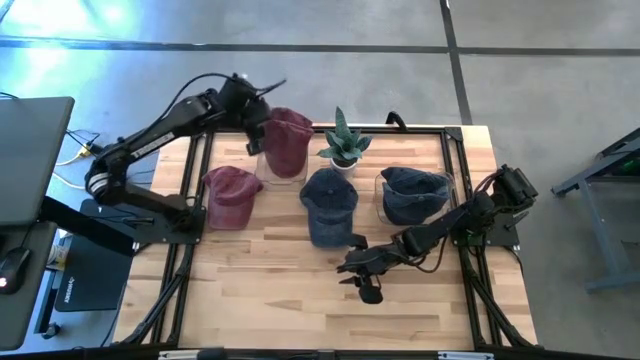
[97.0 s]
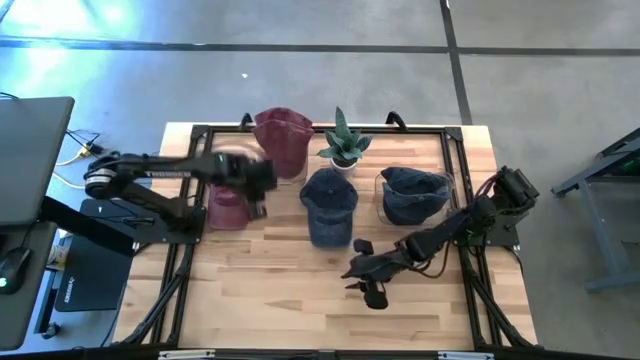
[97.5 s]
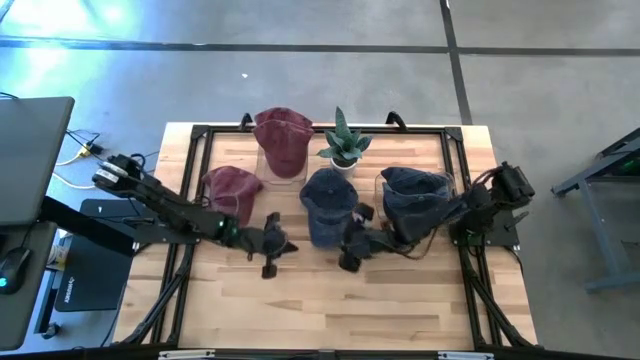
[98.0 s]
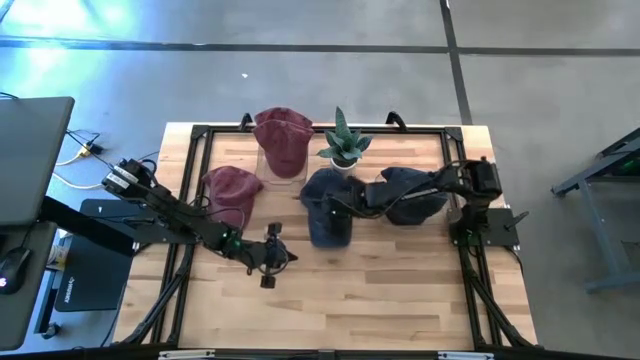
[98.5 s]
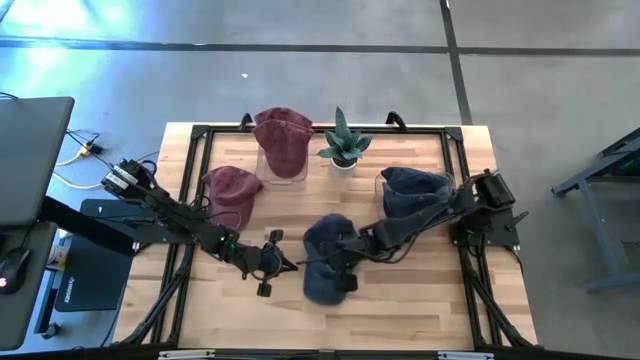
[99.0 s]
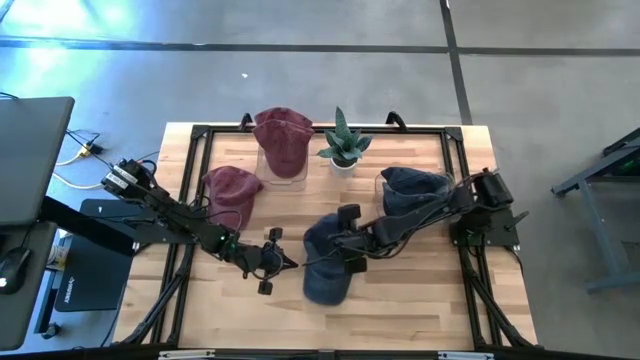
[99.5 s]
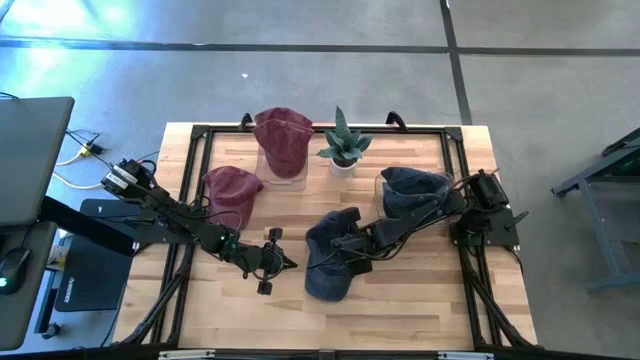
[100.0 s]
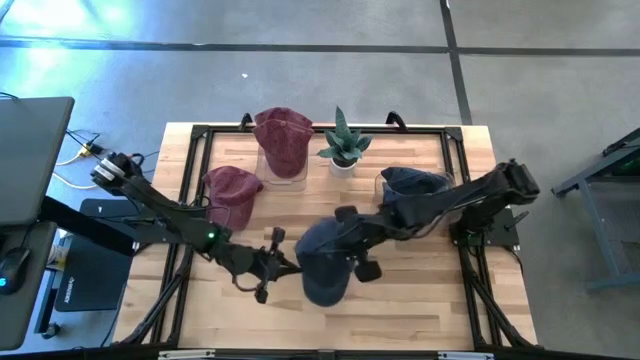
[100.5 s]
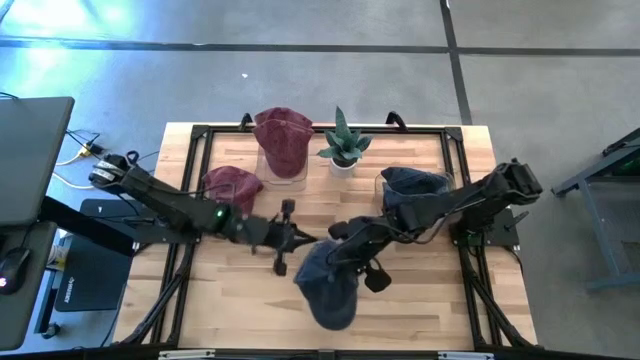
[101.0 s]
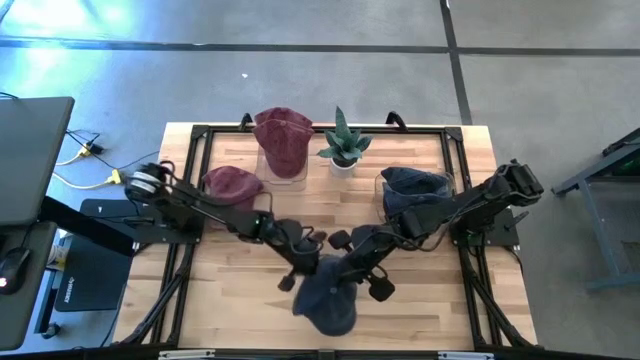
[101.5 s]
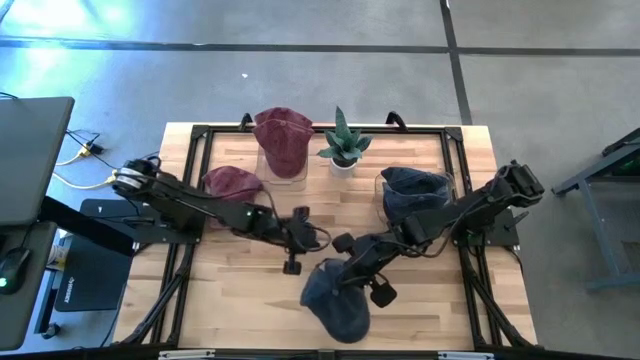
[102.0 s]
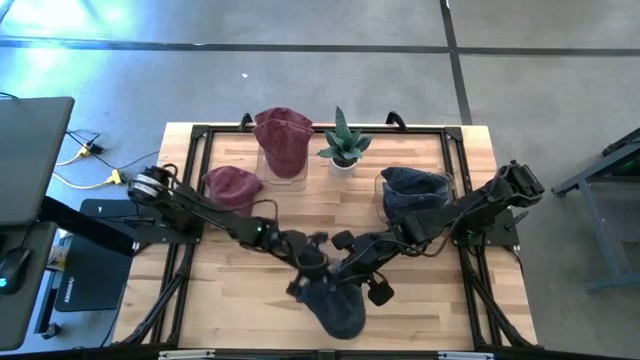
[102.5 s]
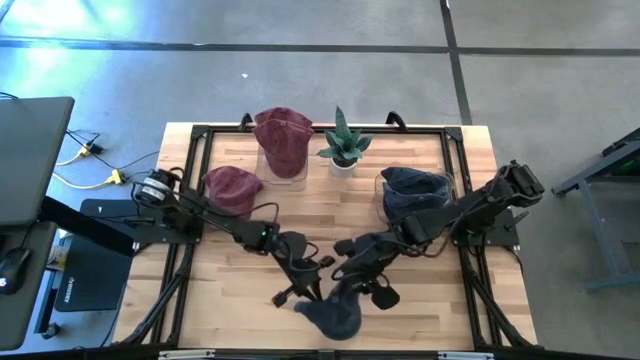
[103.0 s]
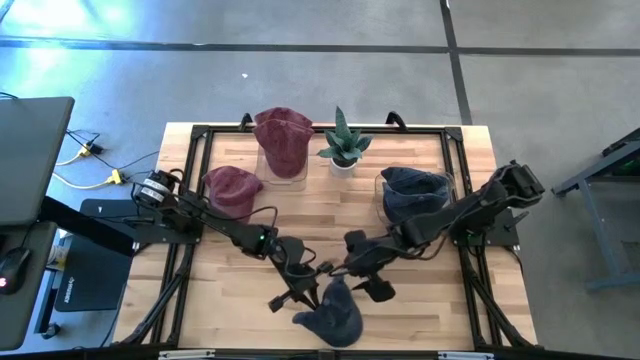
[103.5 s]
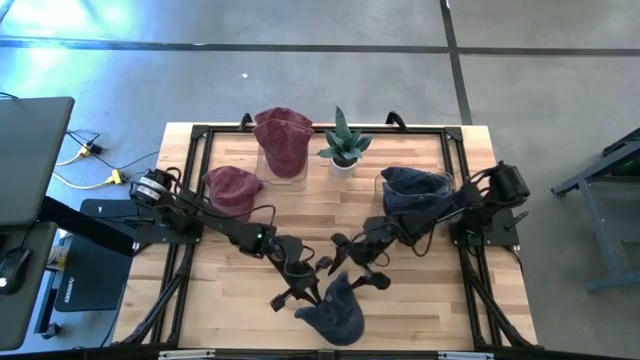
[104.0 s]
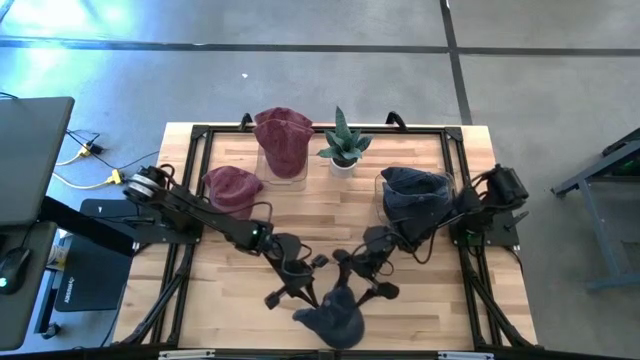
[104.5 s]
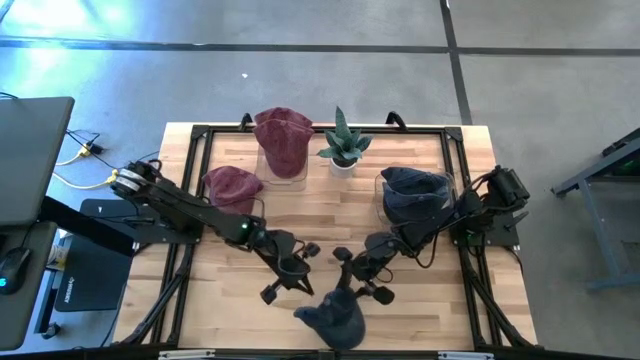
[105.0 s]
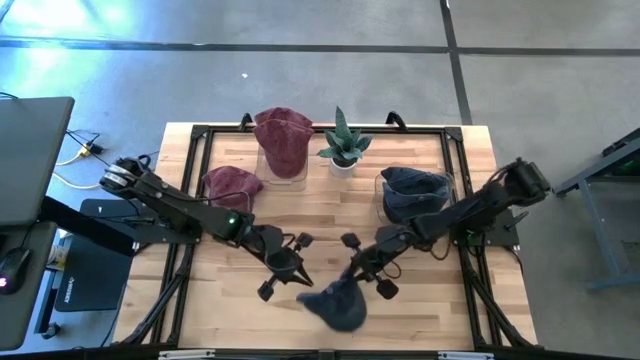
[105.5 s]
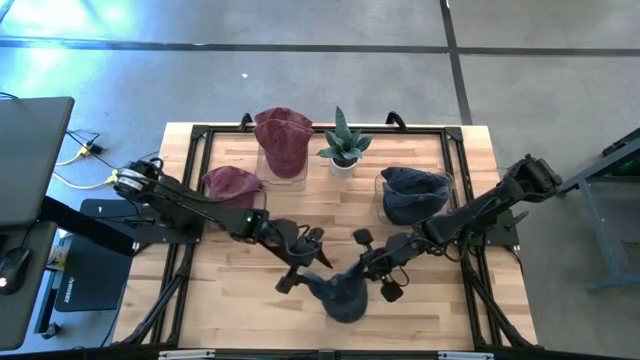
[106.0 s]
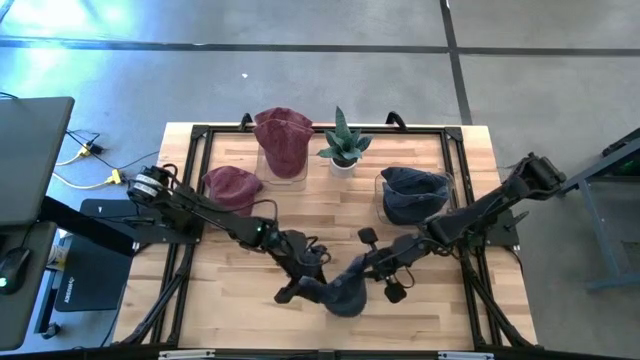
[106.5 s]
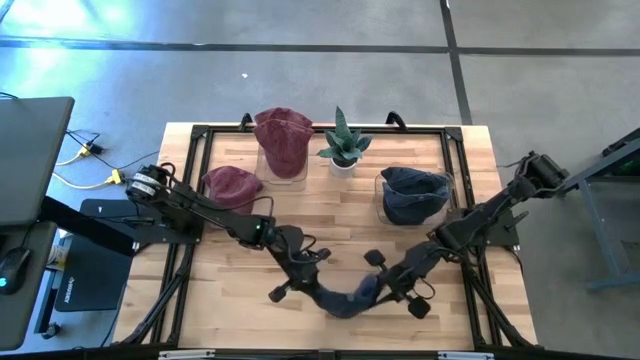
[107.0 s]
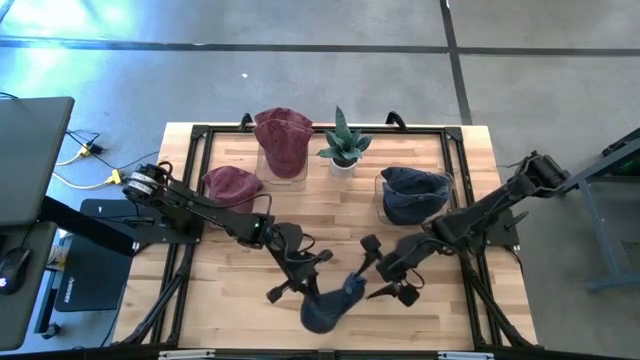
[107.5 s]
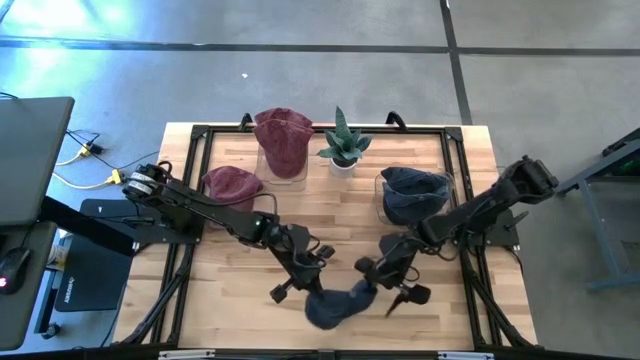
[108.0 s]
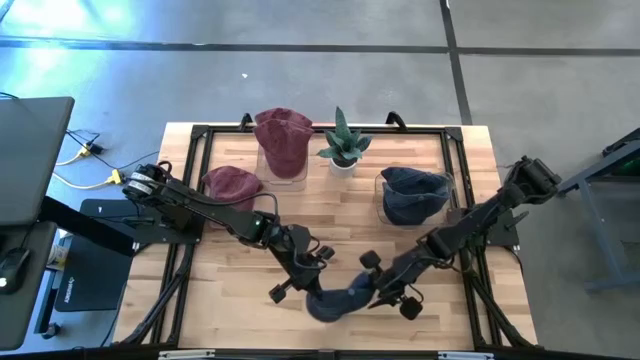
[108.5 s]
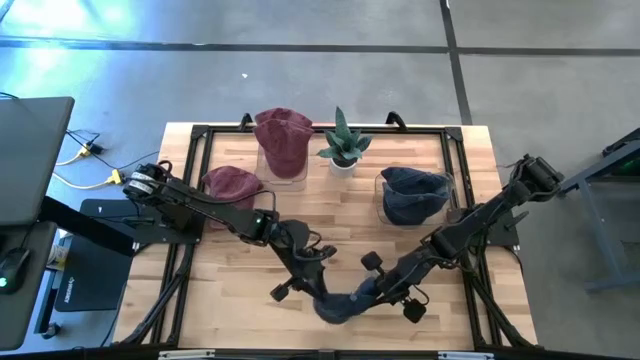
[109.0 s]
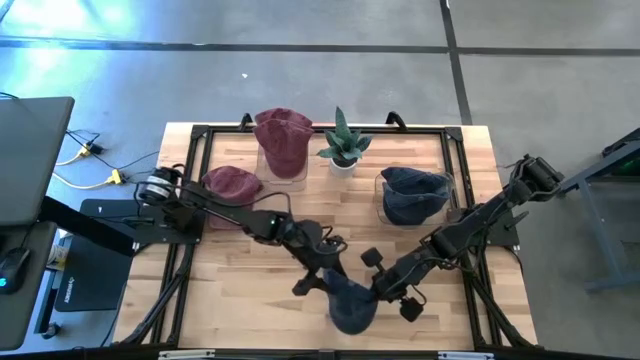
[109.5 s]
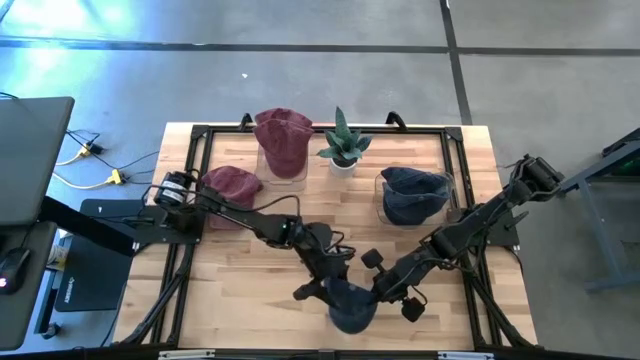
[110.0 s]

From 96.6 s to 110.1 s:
Task: Pick & Place hat
Put the blue cap into the right transparent bin
